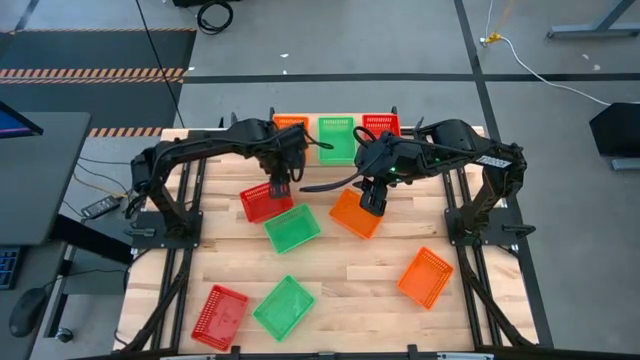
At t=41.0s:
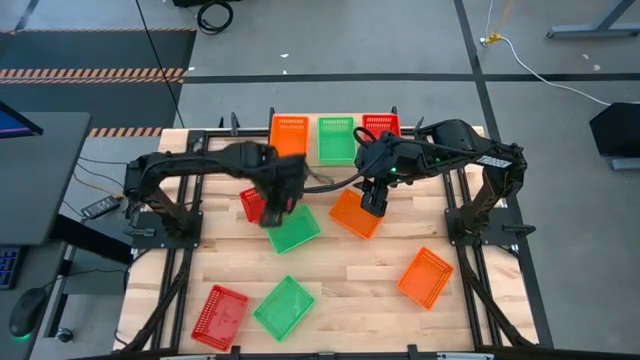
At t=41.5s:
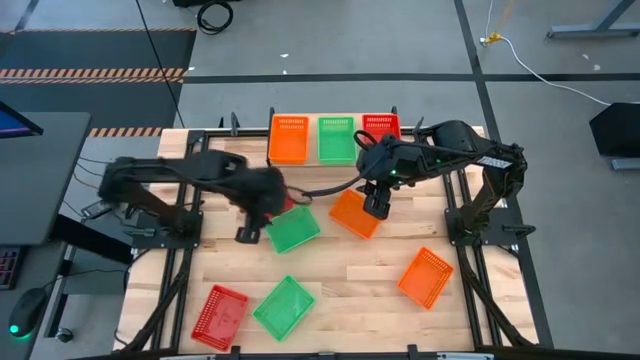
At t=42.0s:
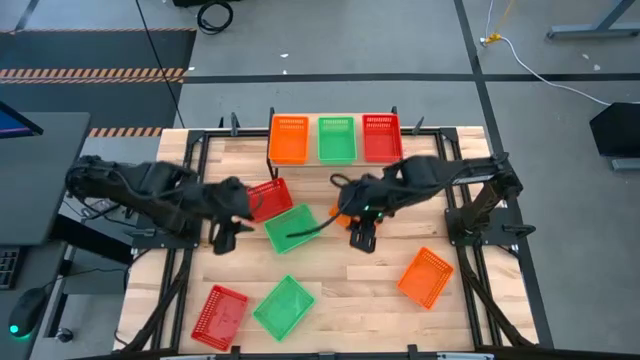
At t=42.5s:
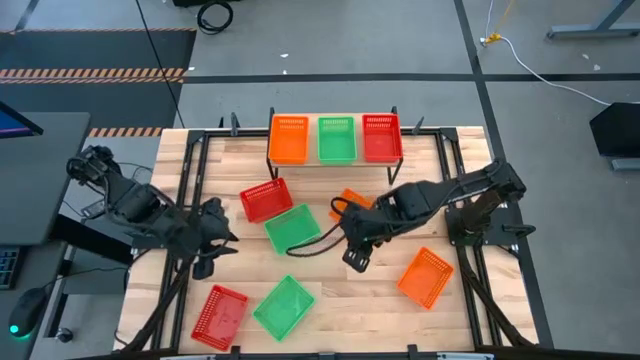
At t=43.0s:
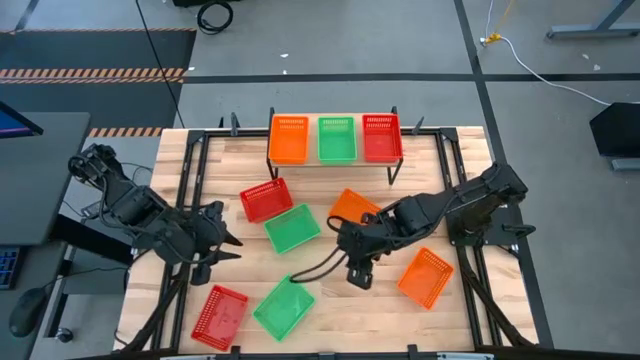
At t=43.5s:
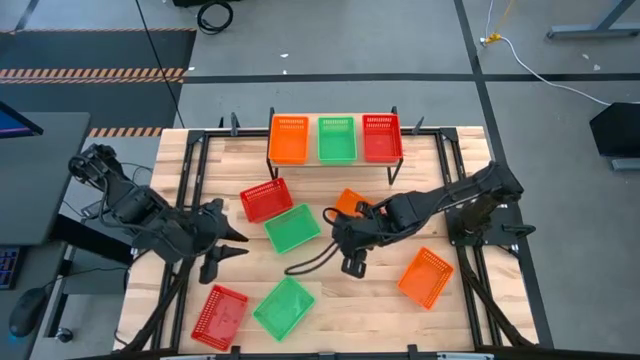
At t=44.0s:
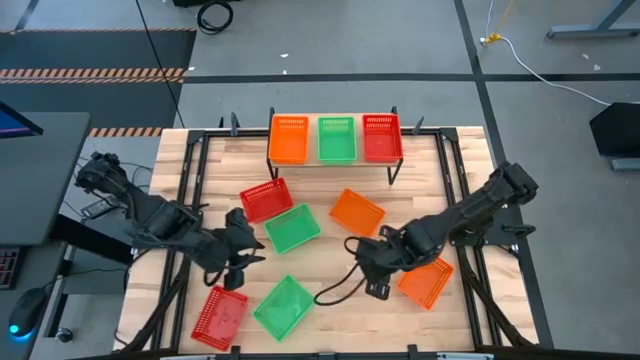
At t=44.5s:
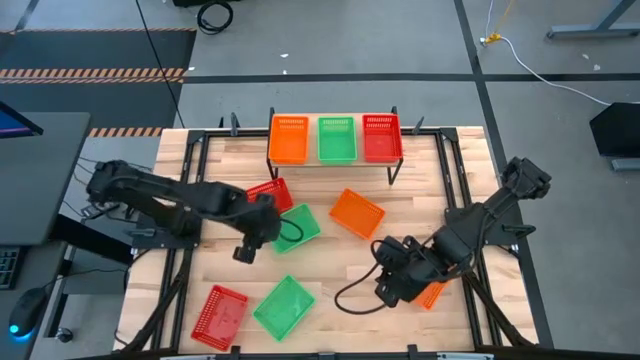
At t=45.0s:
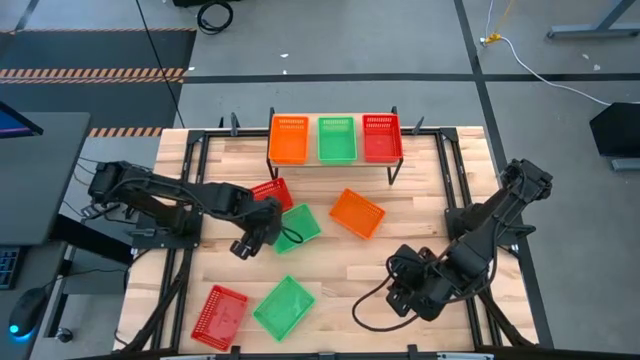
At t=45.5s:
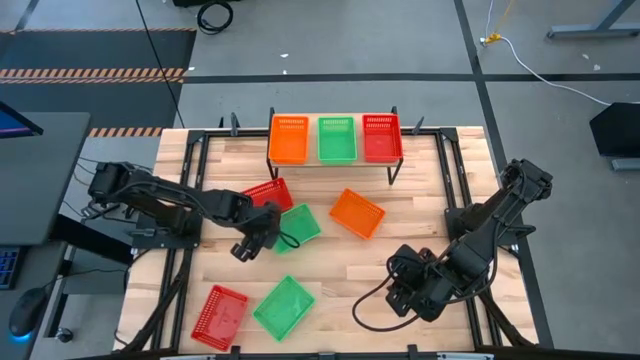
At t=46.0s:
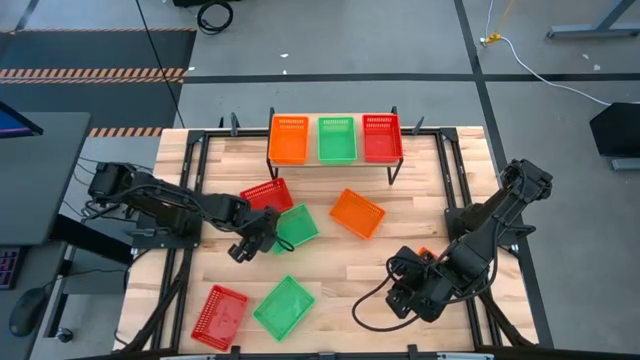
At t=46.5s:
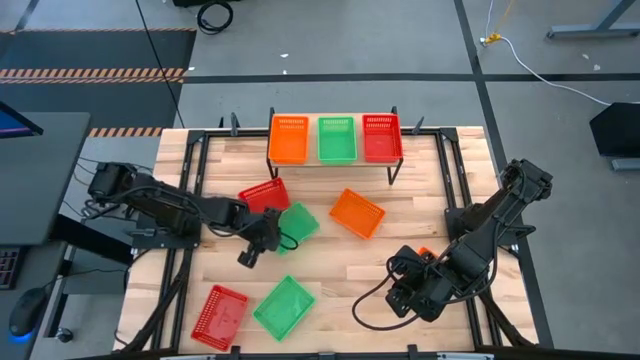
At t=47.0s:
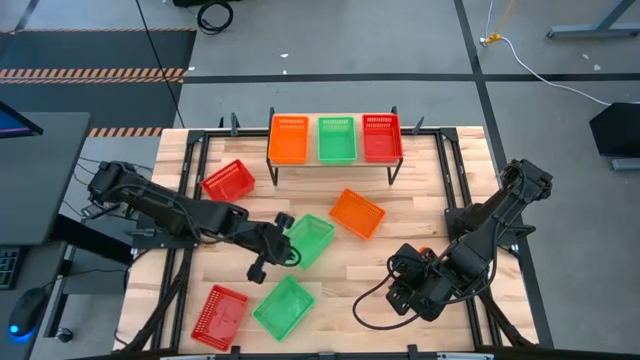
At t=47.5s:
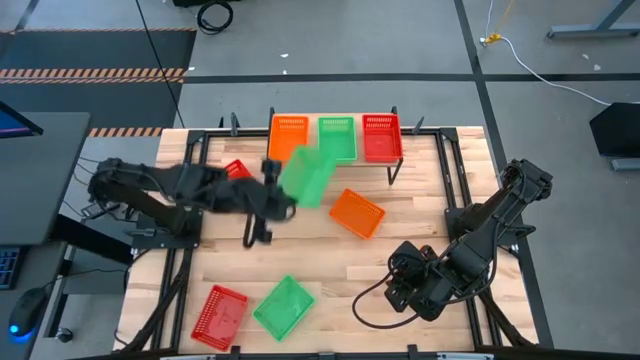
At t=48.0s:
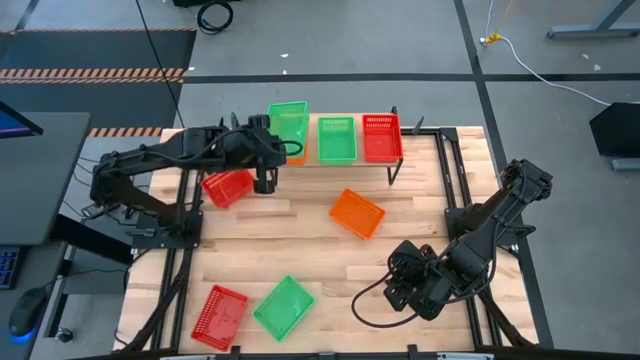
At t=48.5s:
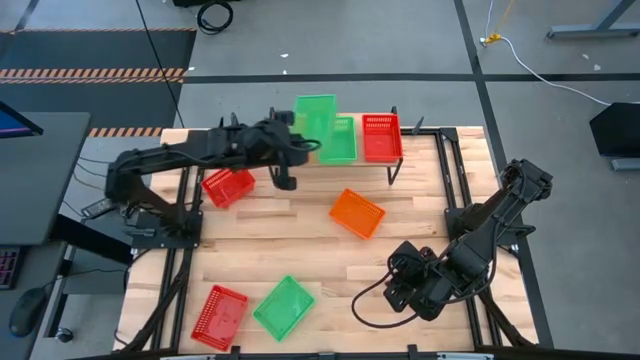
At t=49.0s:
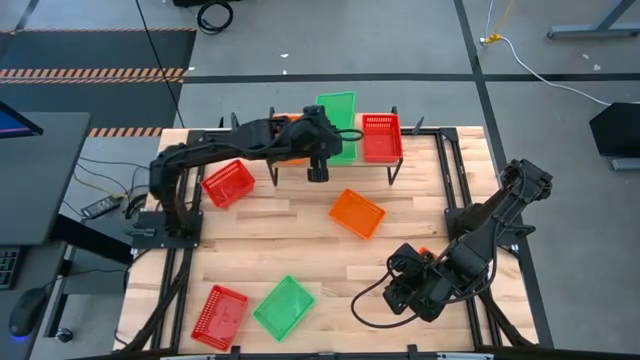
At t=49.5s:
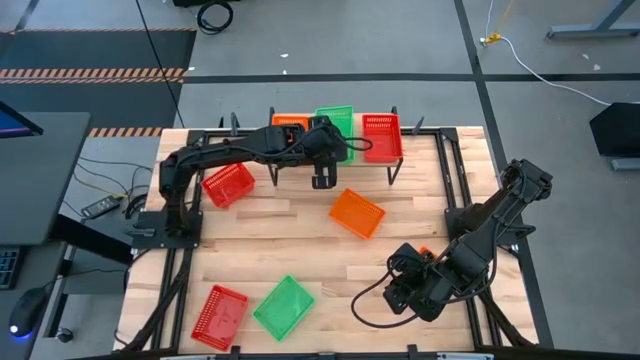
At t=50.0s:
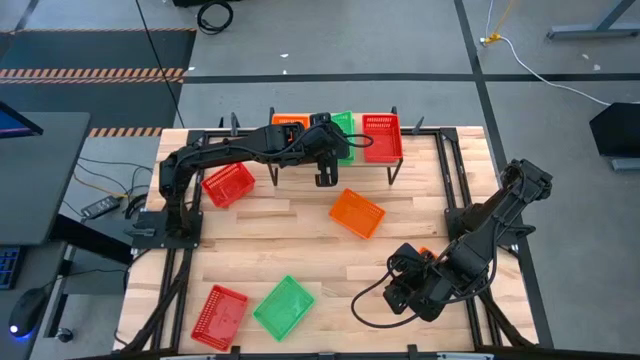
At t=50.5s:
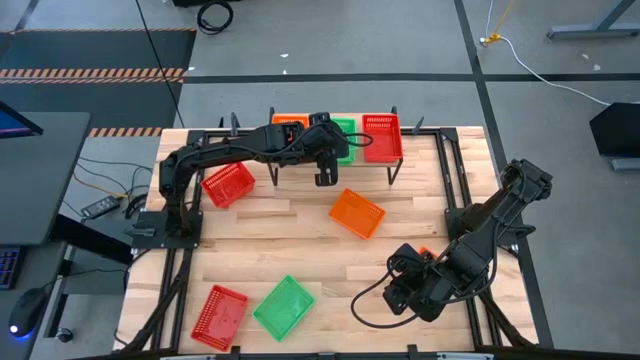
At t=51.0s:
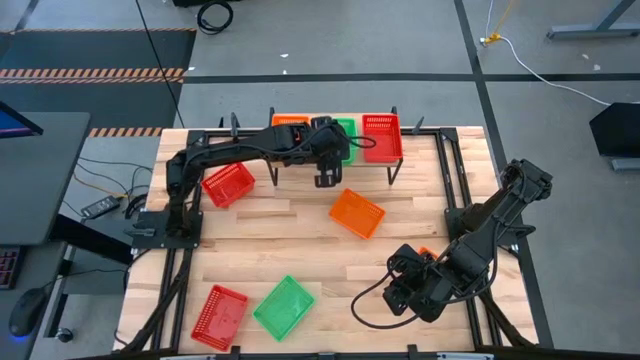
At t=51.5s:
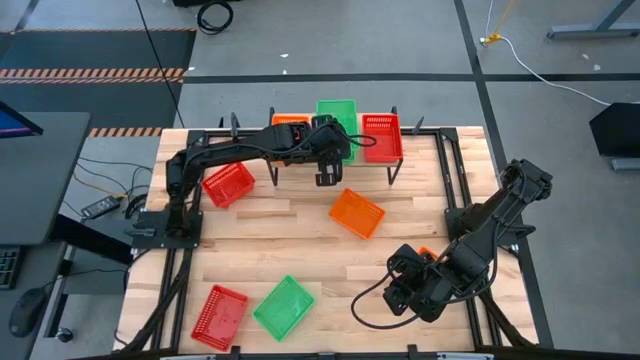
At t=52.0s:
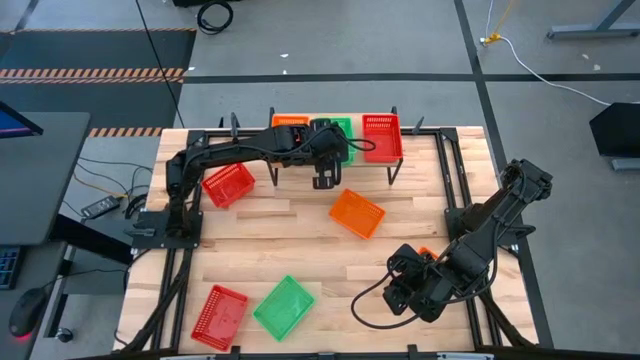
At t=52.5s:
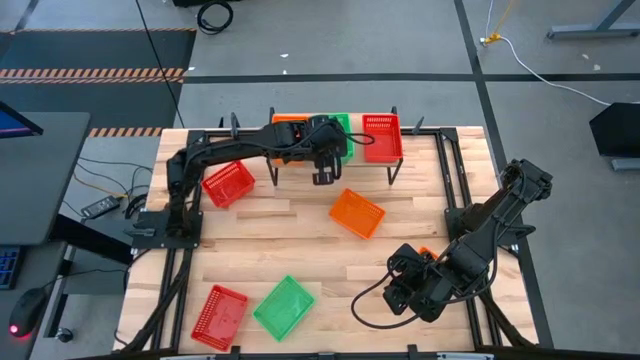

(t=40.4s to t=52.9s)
Task: Stack baskets on shelf by color
Stack the top green bin on the green bin on the shelf

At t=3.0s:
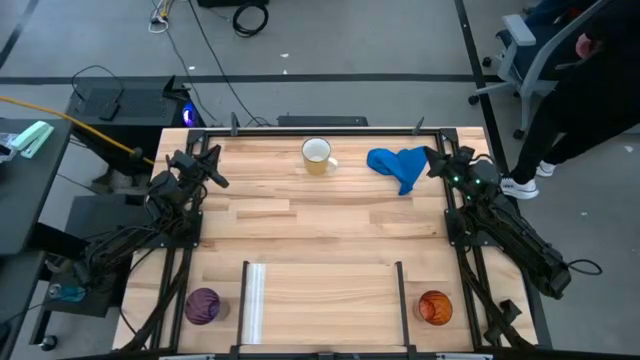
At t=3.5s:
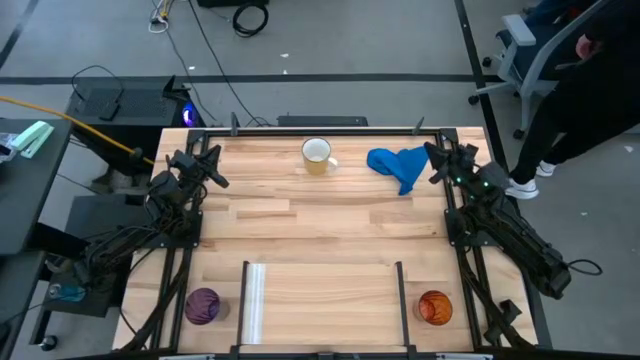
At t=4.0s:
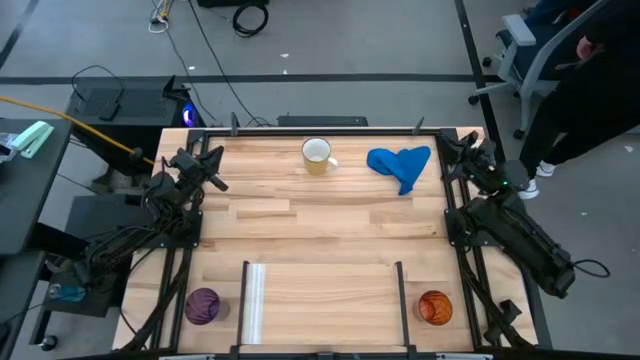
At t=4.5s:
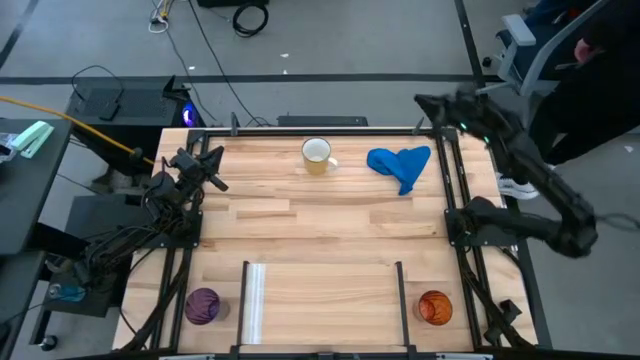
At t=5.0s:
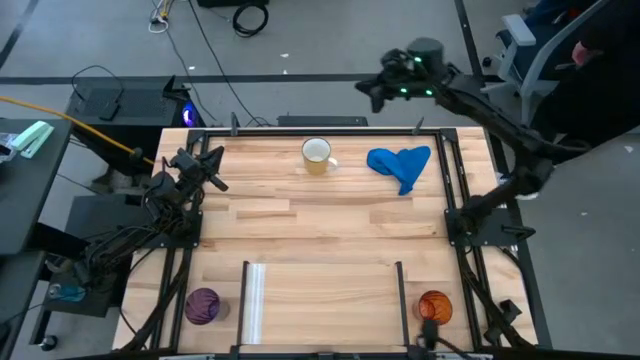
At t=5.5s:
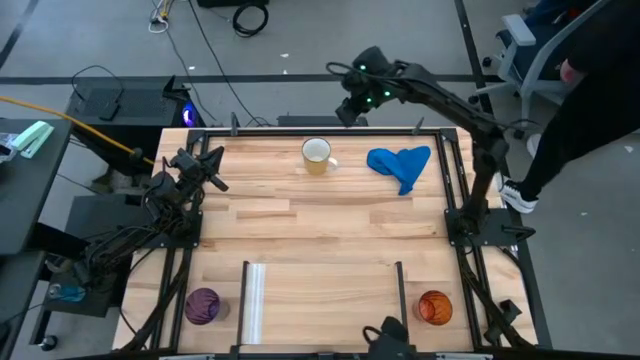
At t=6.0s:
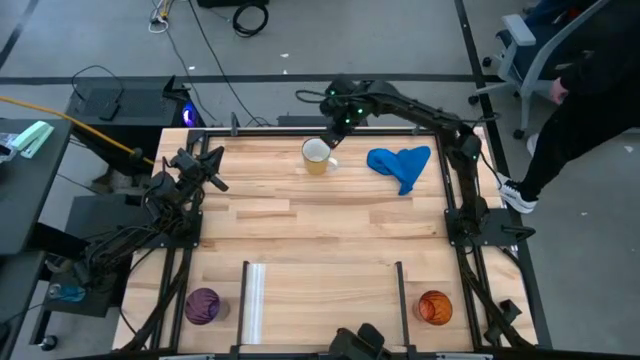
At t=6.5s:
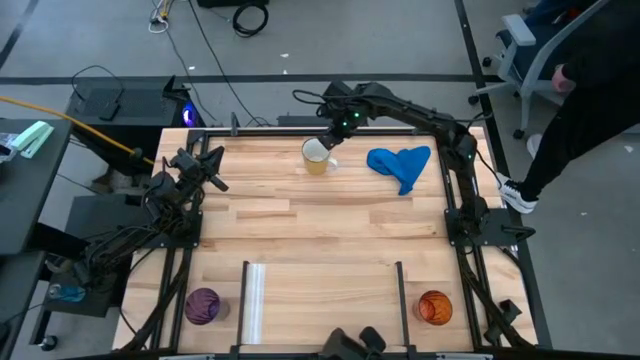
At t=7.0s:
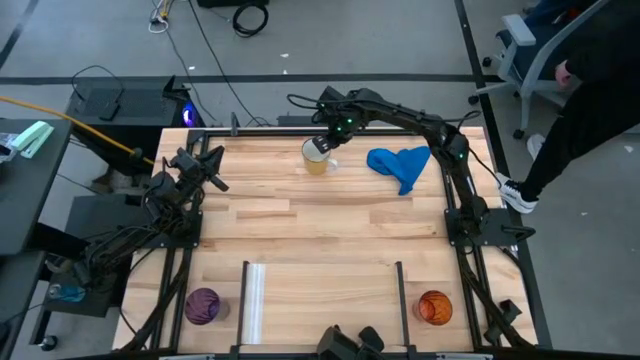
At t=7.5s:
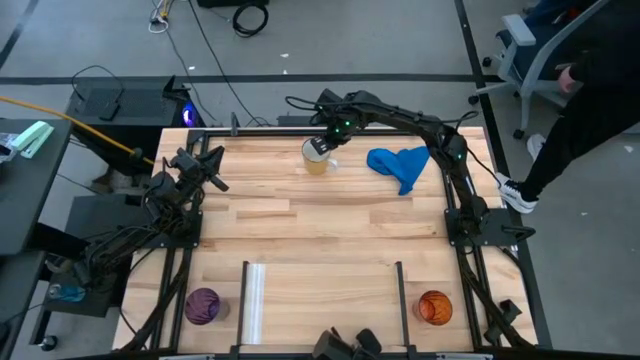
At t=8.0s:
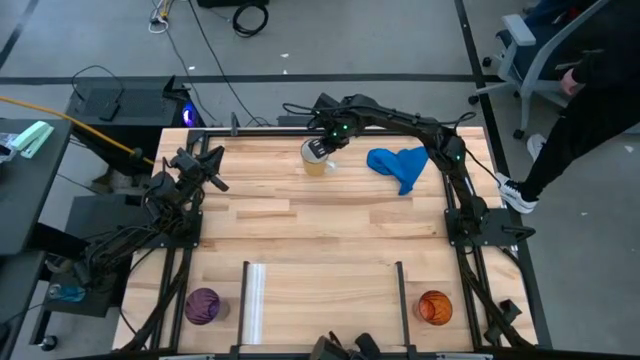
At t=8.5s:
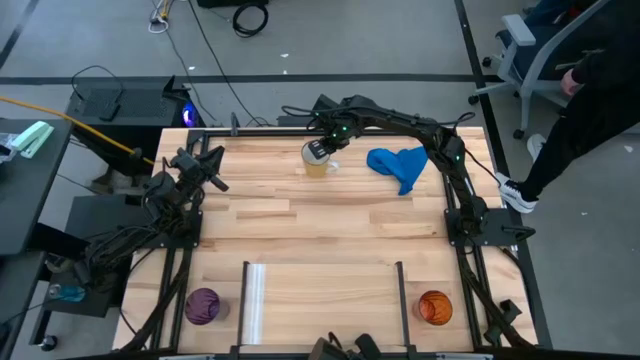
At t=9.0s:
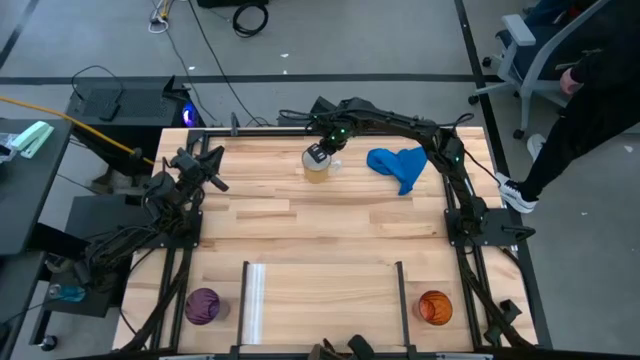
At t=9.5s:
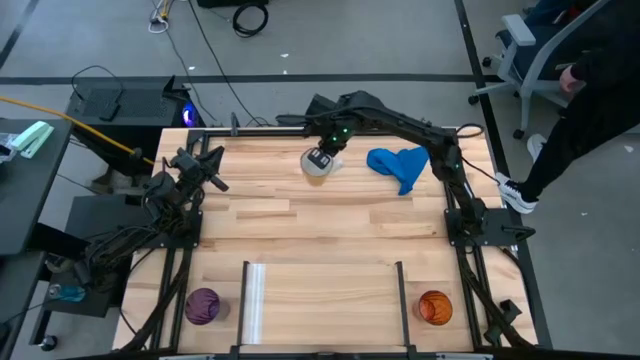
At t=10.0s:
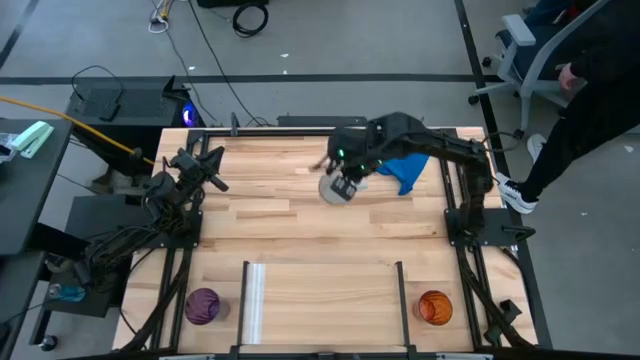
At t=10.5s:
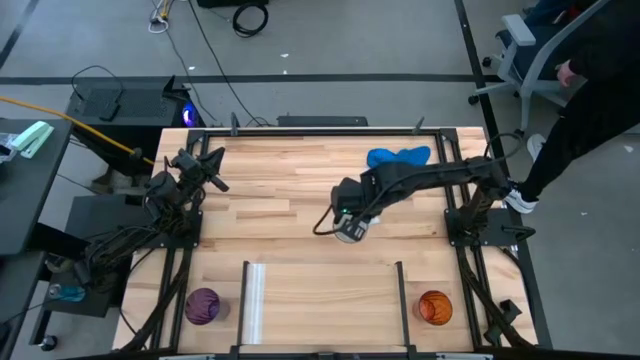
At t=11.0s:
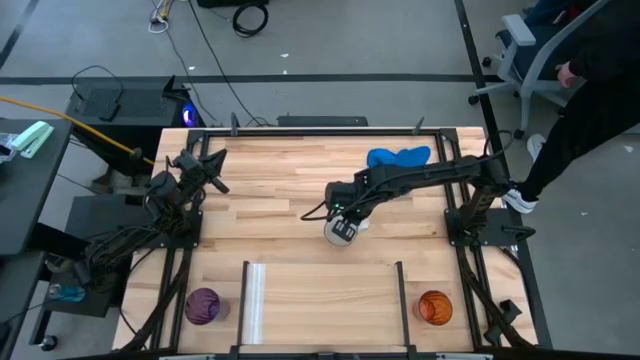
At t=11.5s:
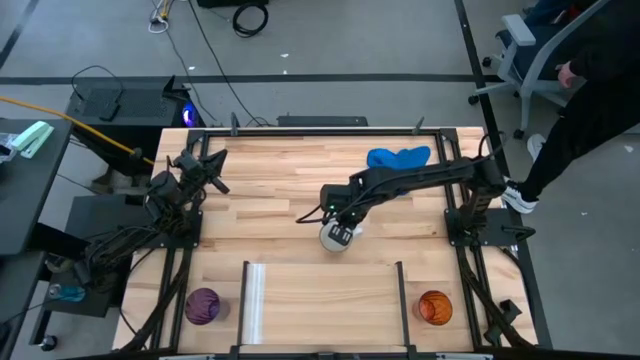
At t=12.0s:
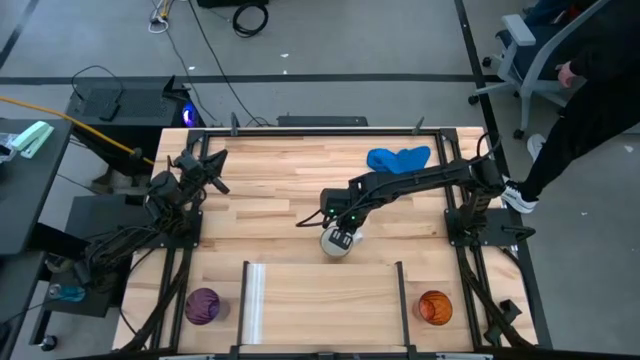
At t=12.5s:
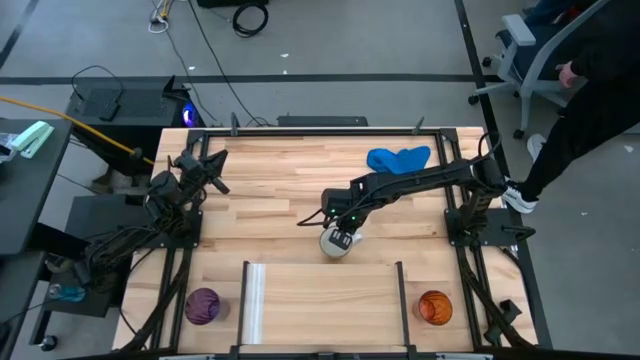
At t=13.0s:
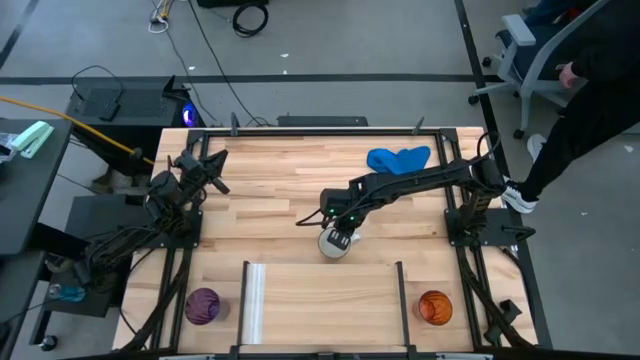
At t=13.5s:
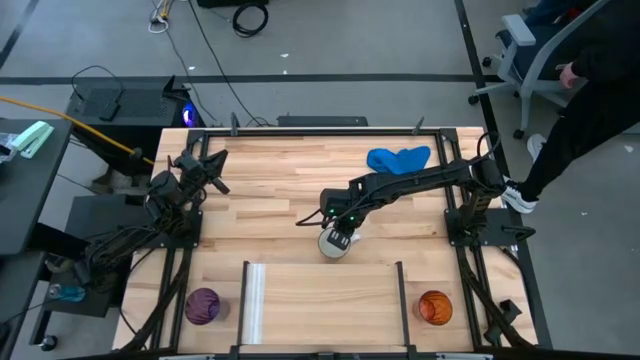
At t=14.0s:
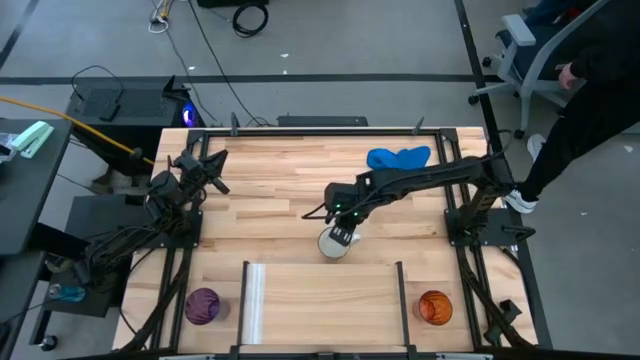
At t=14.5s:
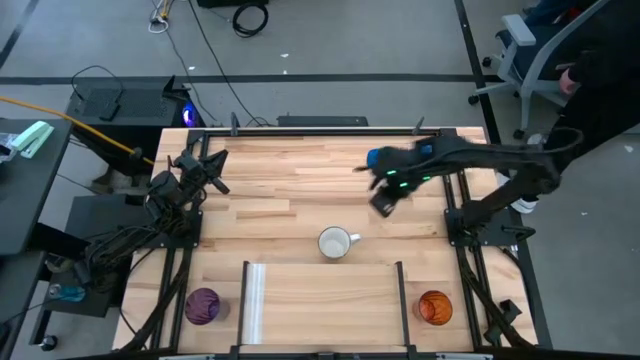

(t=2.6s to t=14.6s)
Task: Stack small to large cups/mugs on shelf
Move the yellow mug to the center of the table
